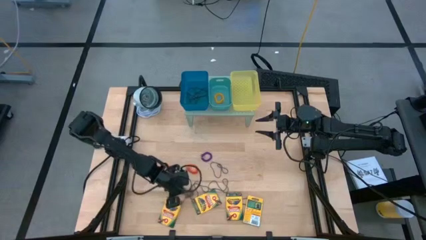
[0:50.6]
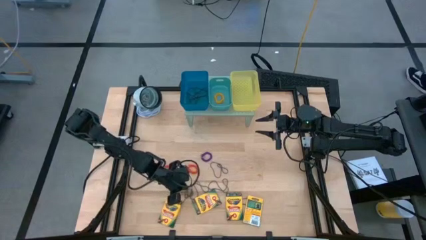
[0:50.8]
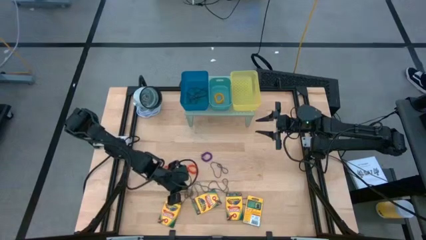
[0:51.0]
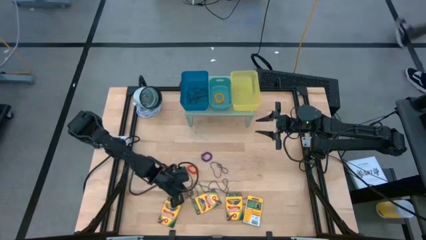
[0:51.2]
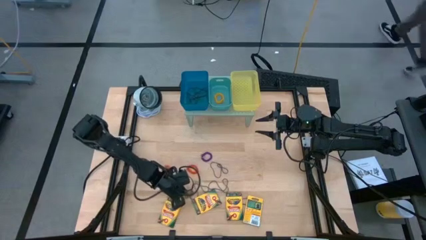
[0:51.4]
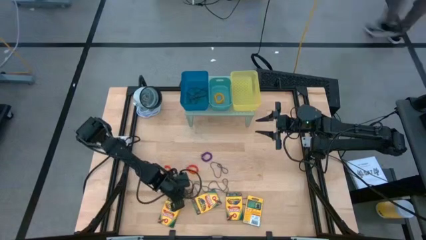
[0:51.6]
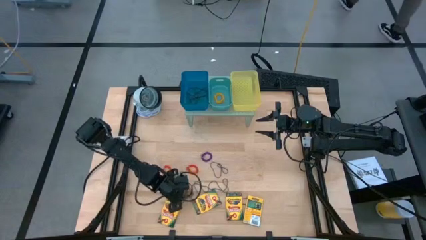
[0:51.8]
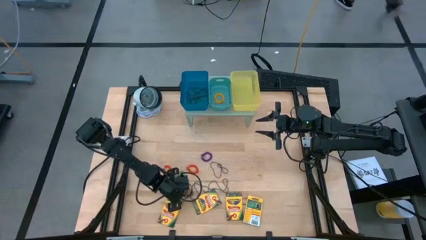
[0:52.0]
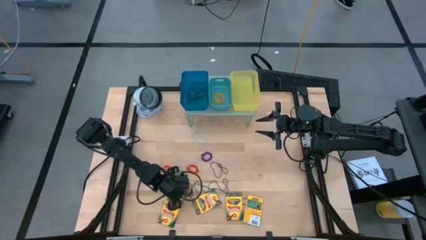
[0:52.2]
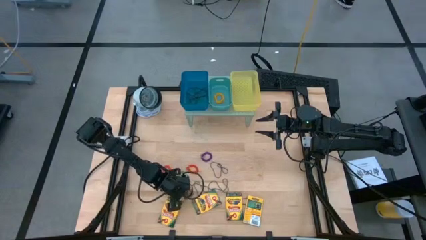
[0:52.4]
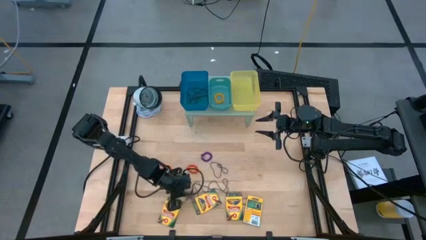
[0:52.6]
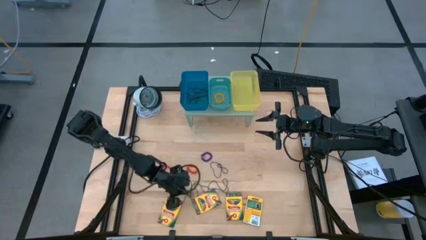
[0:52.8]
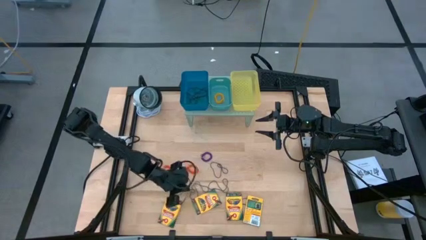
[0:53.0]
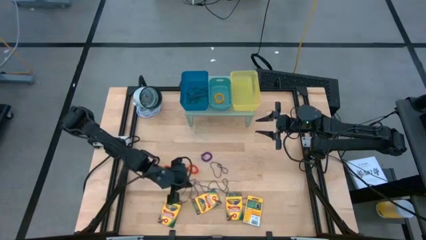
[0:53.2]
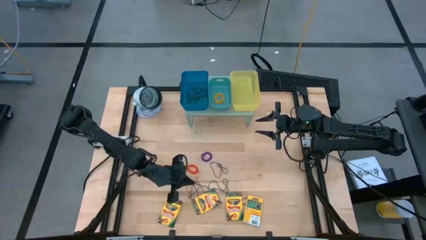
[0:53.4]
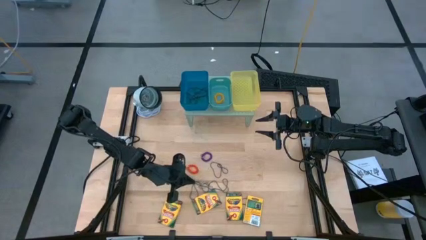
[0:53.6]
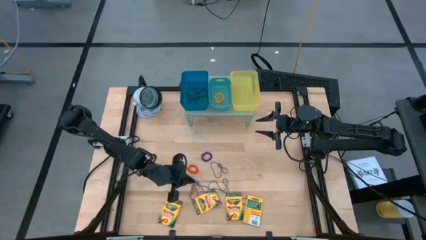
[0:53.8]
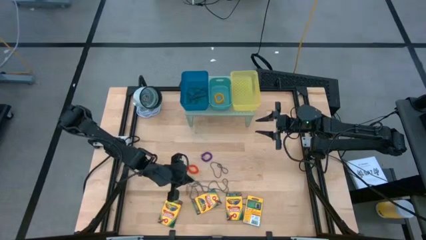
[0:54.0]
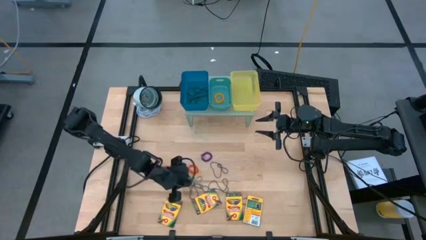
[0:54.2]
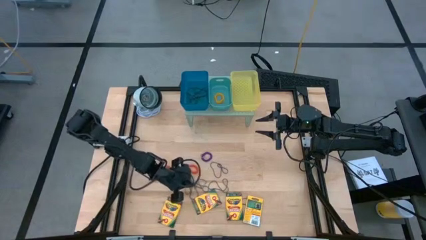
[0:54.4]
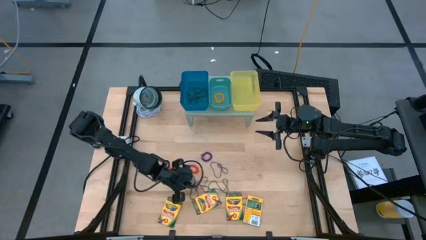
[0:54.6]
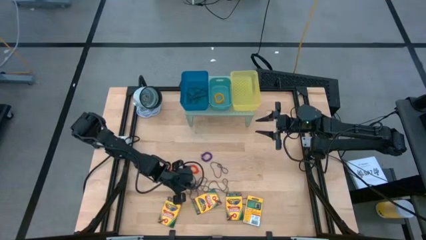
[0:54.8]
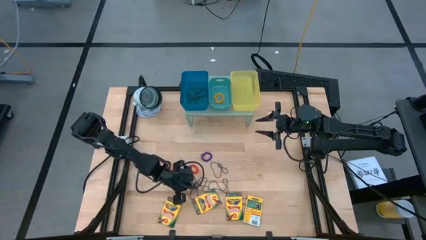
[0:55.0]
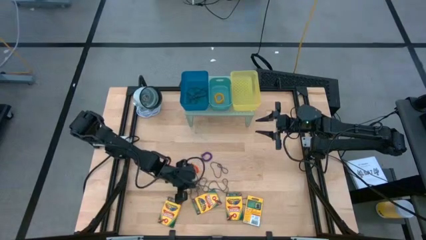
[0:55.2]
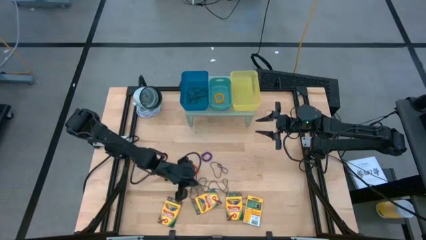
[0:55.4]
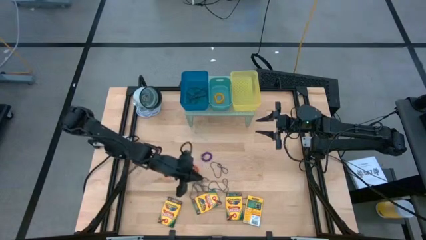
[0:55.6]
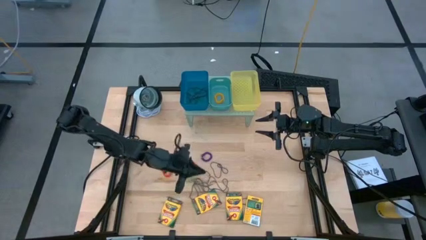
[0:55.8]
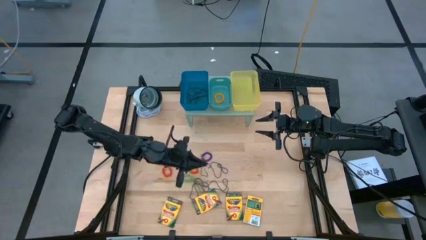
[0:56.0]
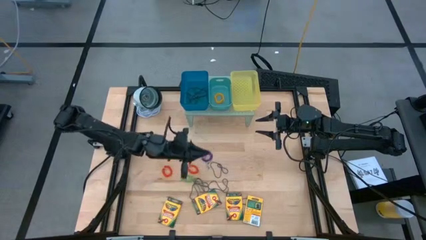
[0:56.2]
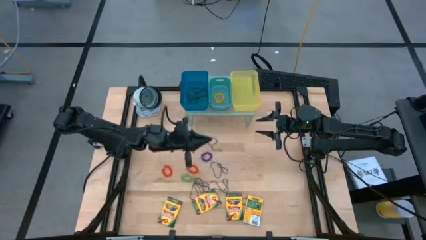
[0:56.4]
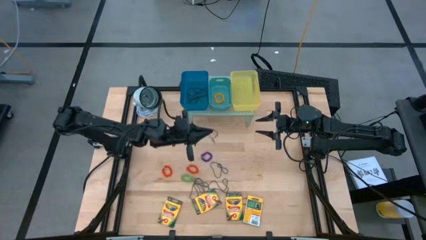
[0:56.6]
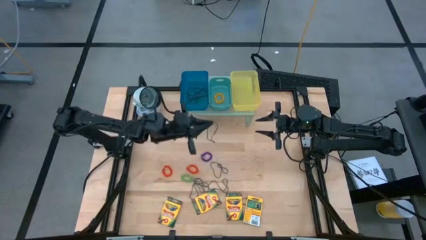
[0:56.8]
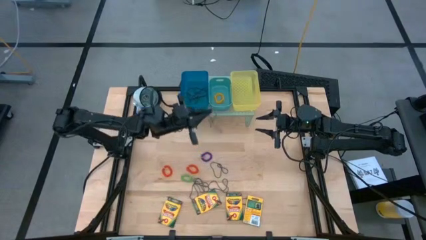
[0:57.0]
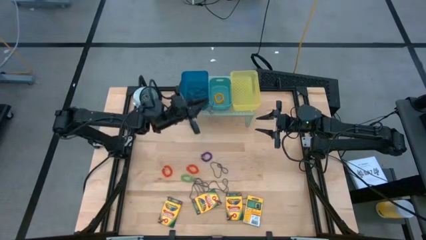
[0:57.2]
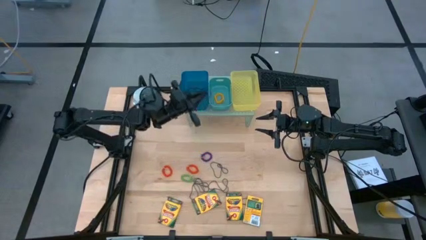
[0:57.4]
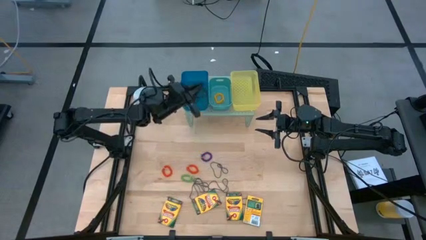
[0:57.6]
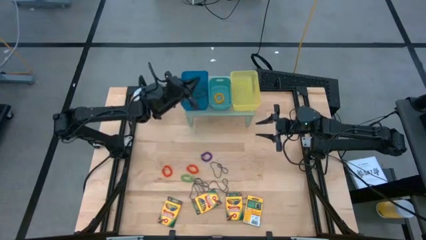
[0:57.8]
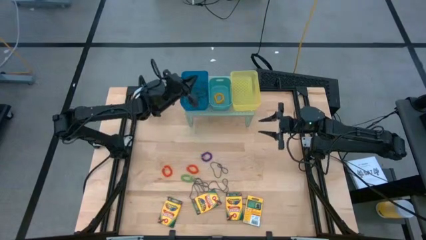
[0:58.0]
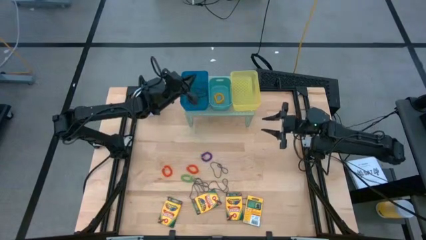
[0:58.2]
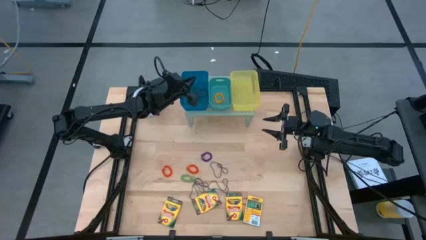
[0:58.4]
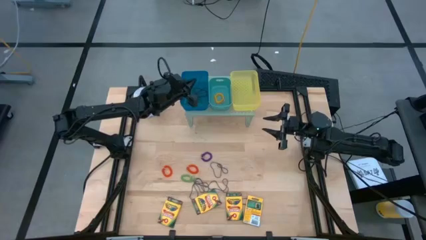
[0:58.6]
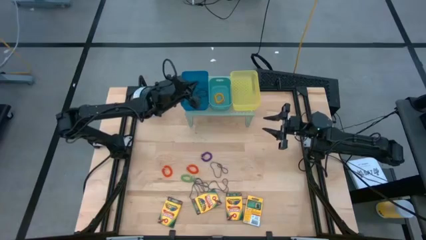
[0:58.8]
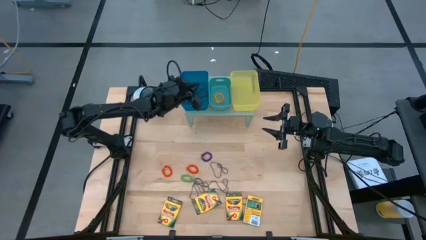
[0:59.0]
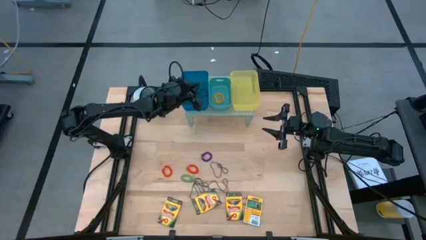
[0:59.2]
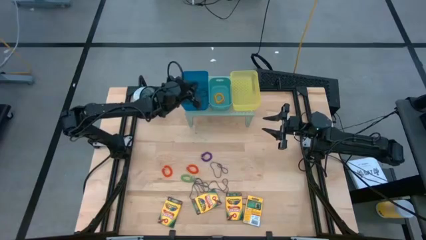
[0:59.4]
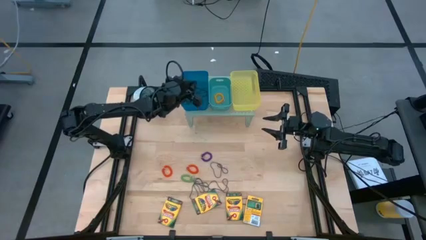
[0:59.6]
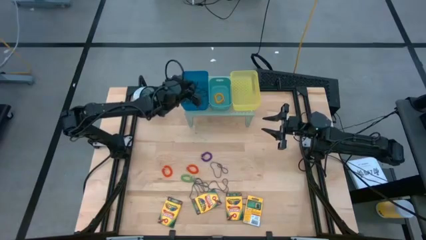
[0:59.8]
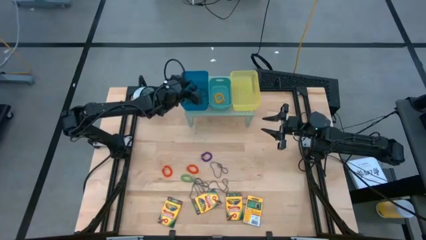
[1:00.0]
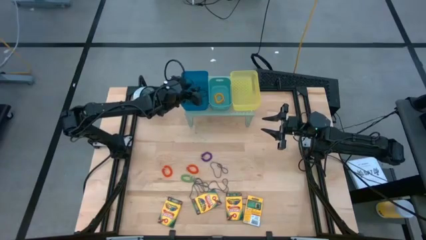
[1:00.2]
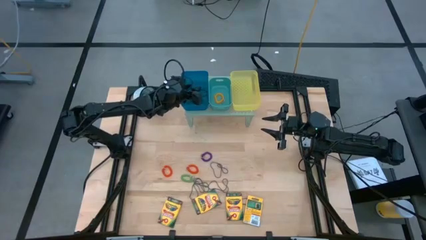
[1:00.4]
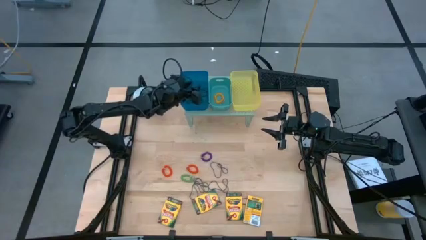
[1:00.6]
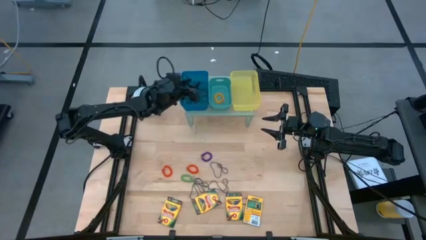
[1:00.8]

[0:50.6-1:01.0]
Task: Pick & Place Office Desk Supplies
Put the purple rubber band into the blue bin on the shelf

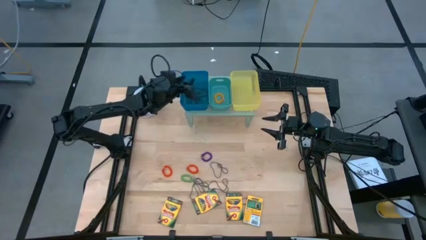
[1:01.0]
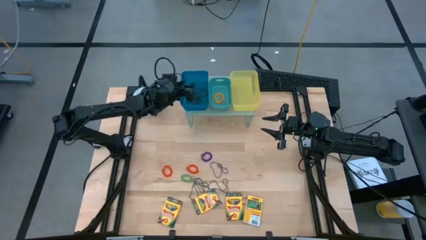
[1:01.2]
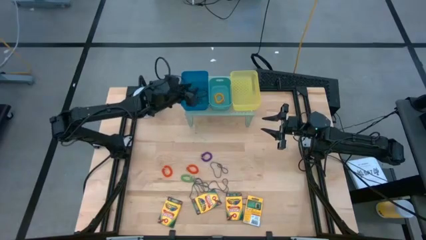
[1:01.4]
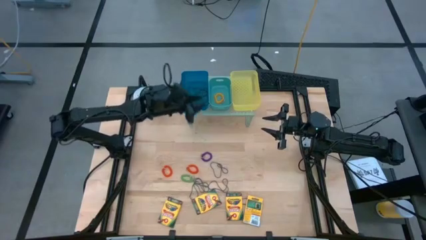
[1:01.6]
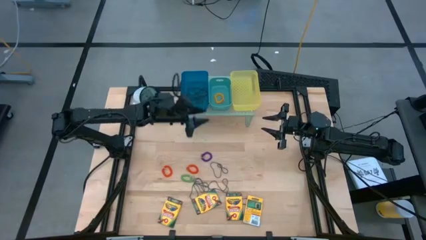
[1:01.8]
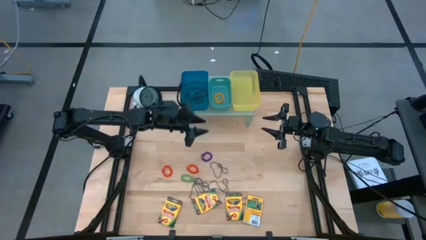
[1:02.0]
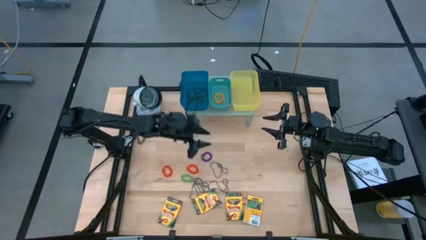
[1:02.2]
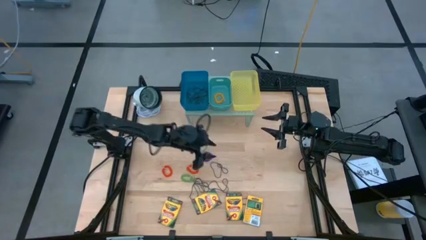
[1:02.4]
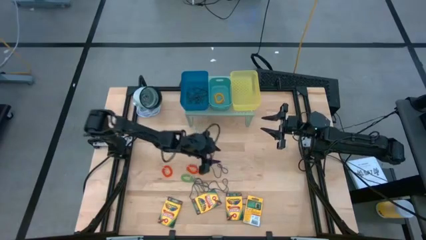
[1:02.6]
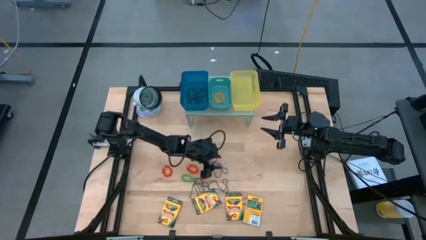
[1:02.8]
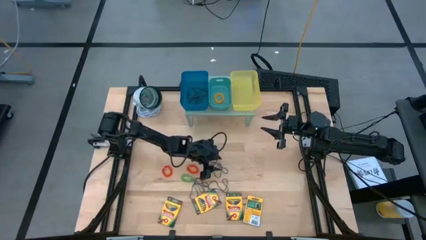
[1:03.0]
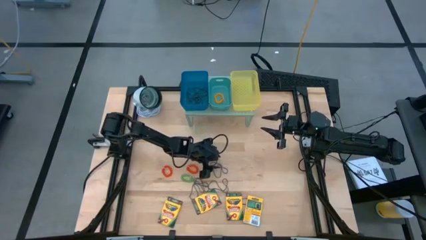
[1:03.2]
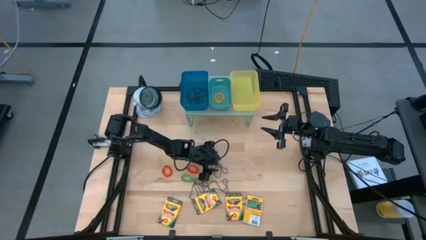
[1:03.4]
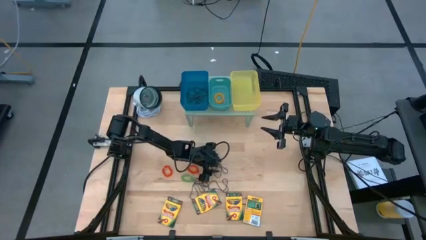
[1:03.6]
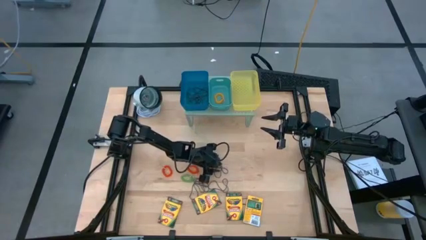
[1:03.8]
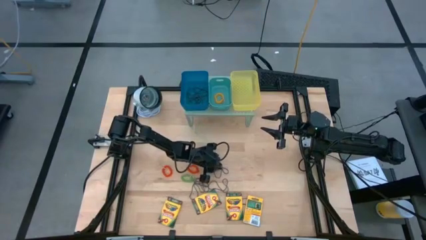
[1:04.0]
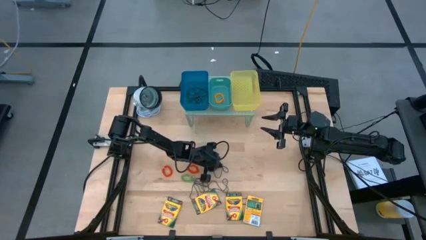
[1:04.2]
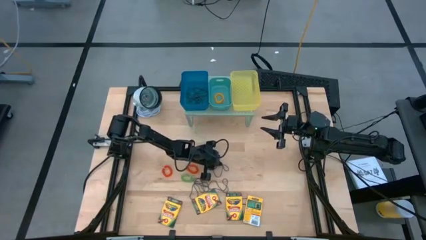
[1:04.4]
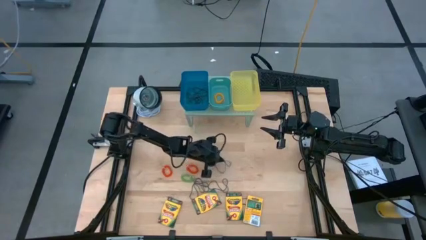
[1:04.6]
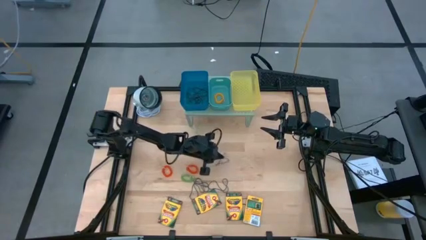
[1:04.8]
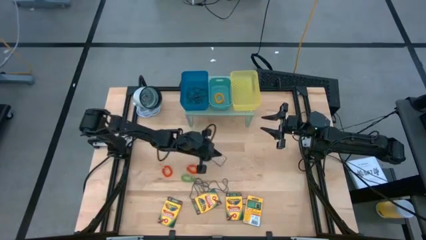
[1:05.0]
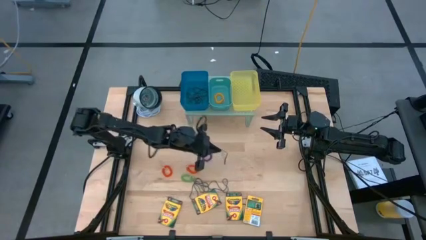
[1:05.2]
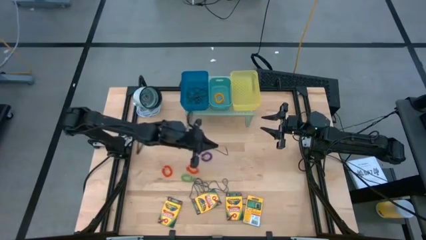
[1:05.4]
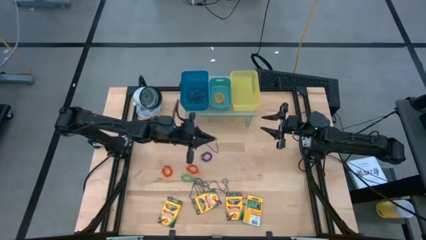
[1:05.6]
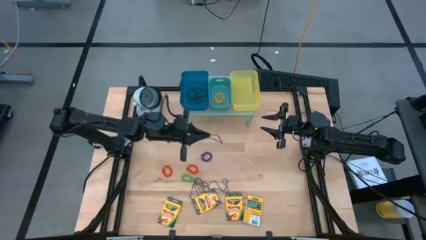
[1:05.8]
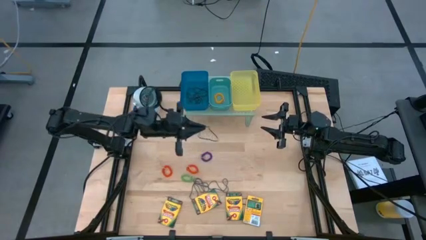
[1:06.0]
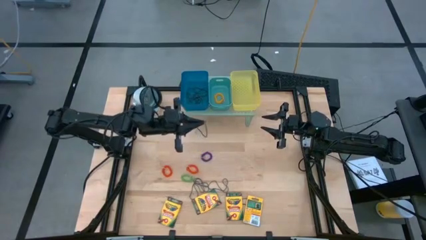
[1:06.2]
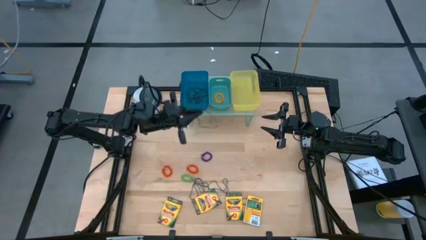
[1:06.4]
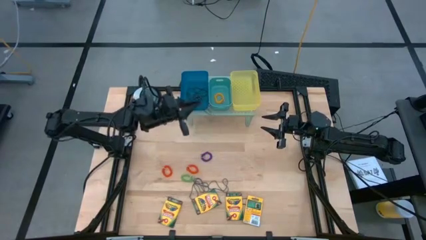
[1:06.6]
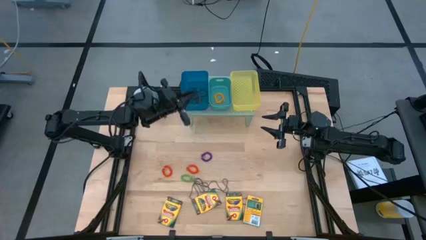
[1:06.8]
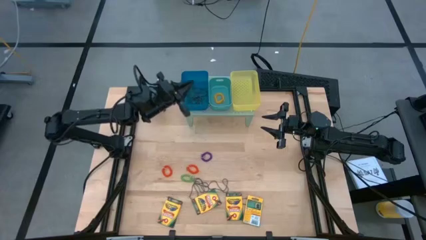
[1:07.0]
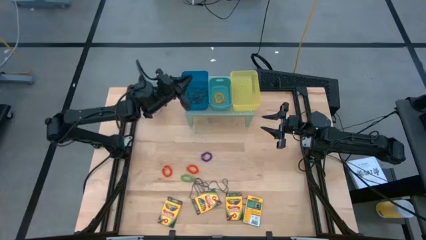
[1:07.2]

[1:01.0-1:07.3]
Put the purple rubber band into the blue bin on the shelf
